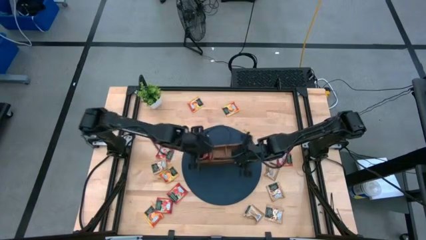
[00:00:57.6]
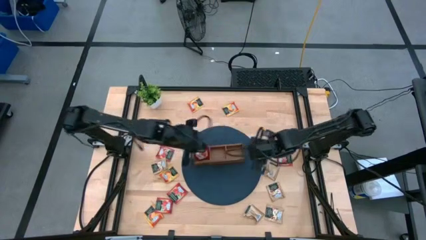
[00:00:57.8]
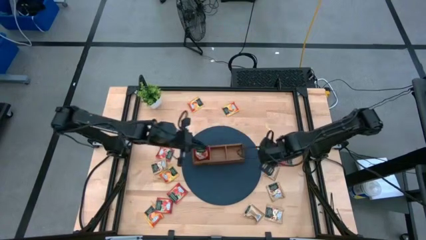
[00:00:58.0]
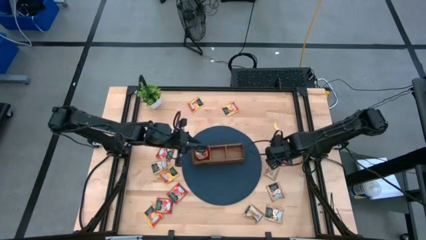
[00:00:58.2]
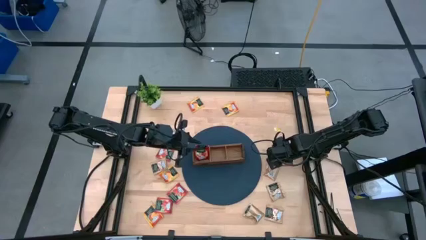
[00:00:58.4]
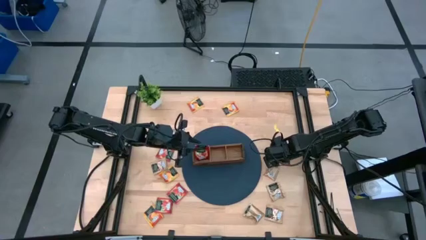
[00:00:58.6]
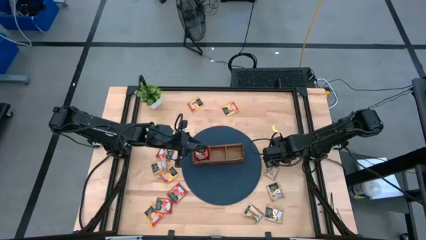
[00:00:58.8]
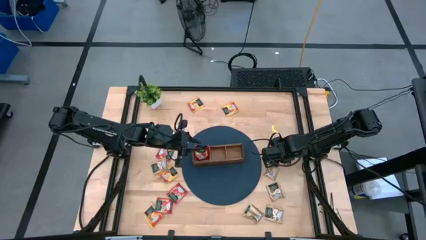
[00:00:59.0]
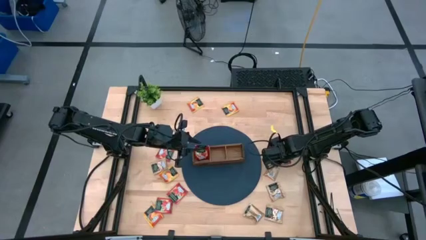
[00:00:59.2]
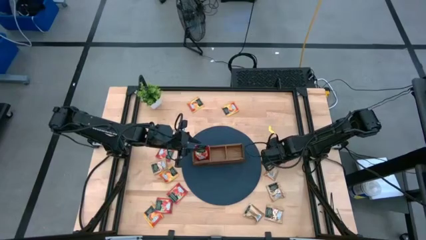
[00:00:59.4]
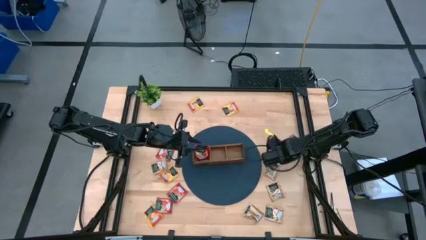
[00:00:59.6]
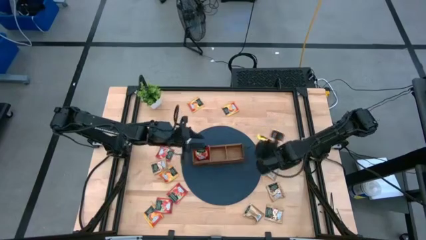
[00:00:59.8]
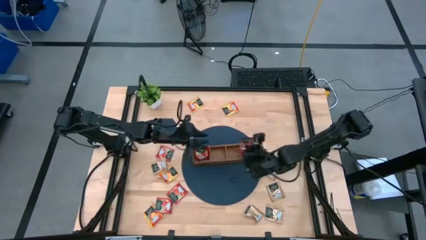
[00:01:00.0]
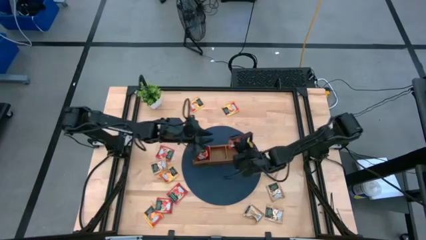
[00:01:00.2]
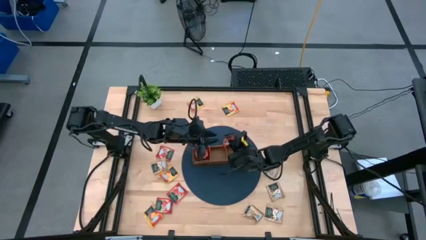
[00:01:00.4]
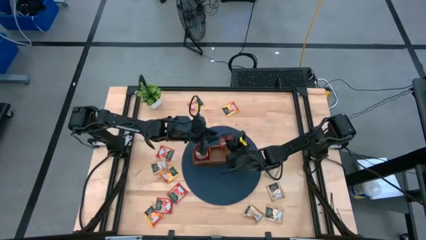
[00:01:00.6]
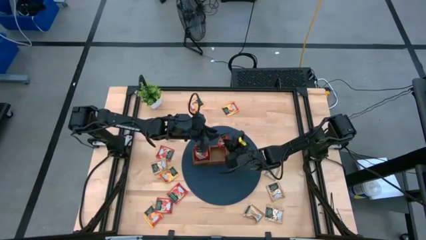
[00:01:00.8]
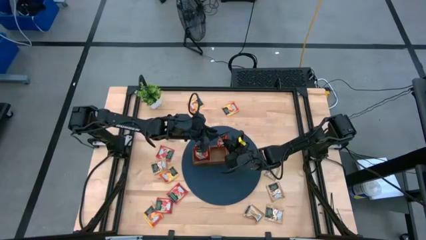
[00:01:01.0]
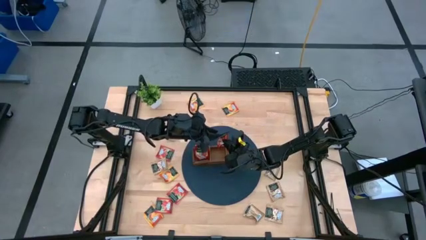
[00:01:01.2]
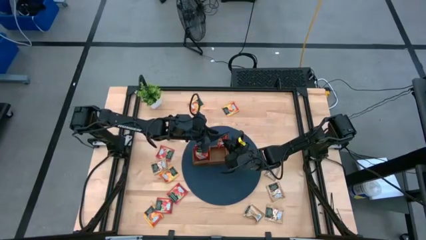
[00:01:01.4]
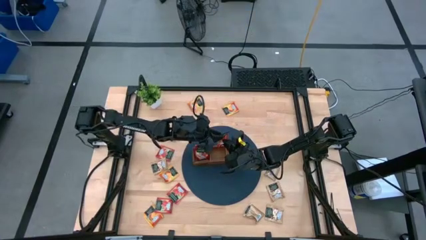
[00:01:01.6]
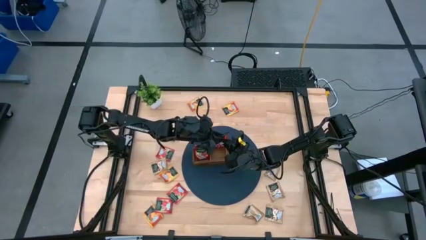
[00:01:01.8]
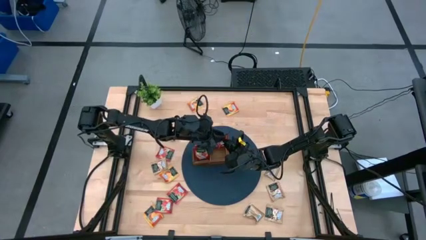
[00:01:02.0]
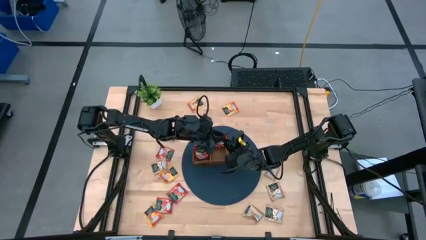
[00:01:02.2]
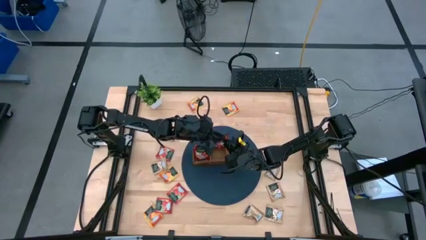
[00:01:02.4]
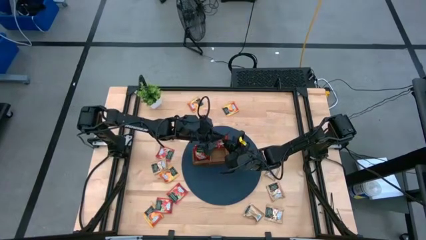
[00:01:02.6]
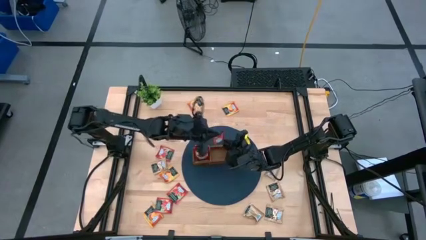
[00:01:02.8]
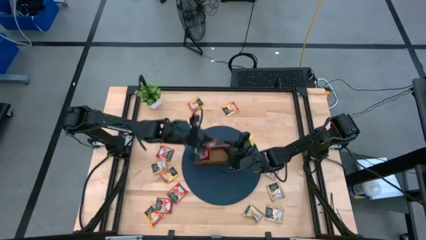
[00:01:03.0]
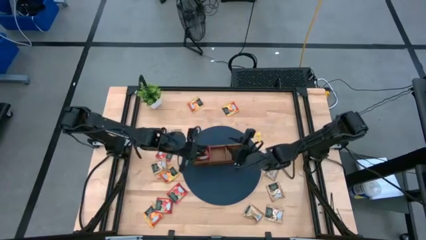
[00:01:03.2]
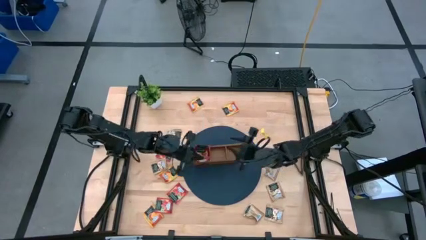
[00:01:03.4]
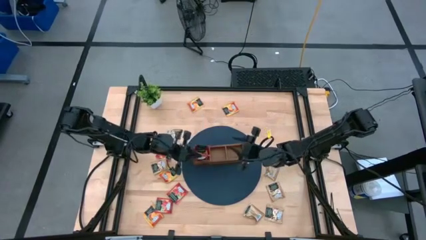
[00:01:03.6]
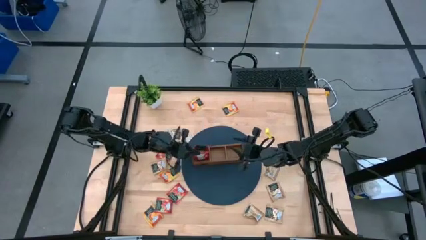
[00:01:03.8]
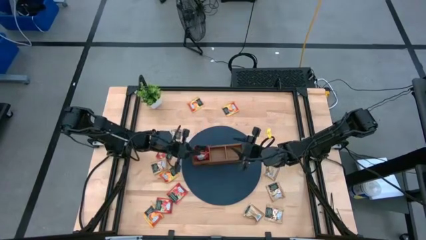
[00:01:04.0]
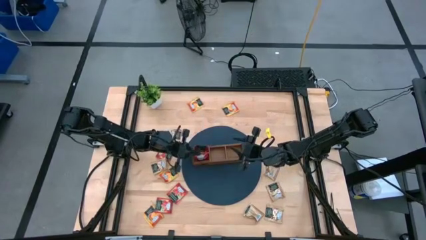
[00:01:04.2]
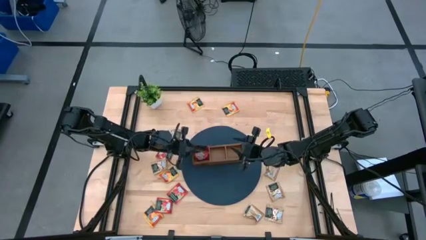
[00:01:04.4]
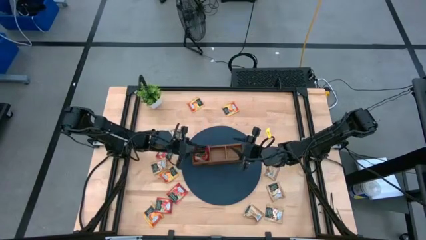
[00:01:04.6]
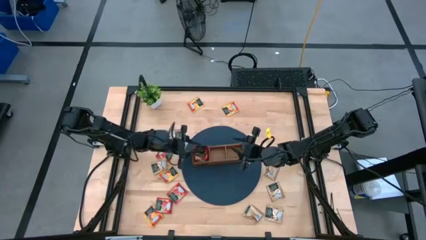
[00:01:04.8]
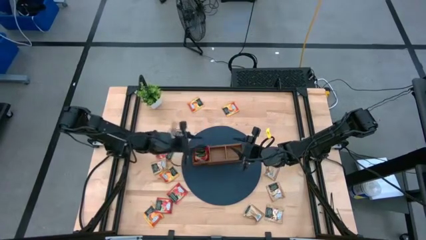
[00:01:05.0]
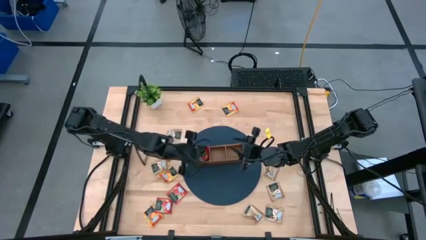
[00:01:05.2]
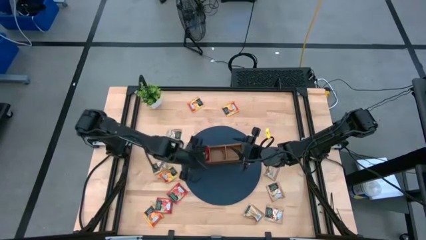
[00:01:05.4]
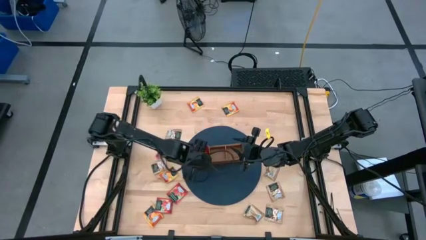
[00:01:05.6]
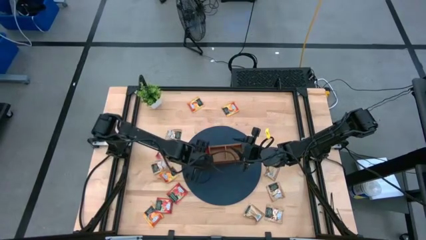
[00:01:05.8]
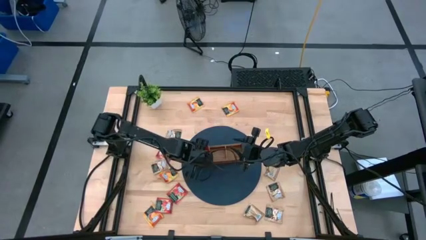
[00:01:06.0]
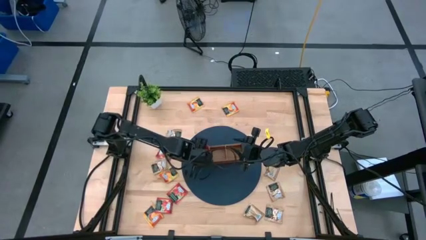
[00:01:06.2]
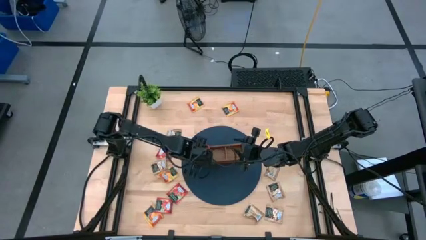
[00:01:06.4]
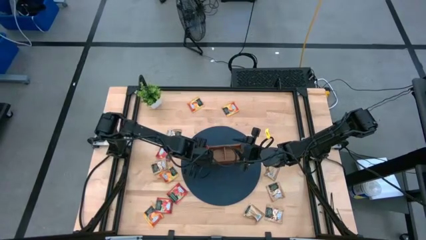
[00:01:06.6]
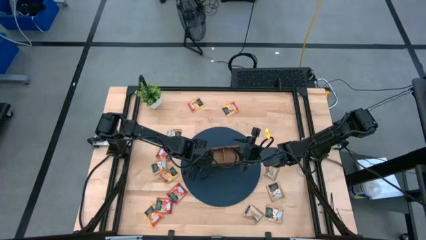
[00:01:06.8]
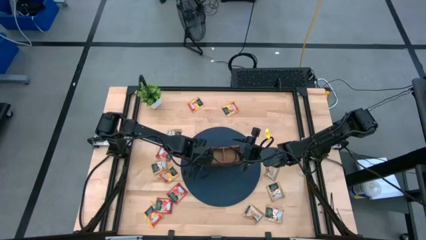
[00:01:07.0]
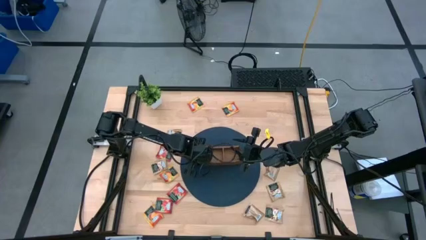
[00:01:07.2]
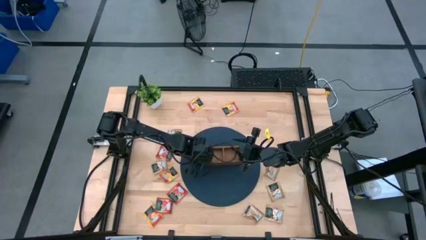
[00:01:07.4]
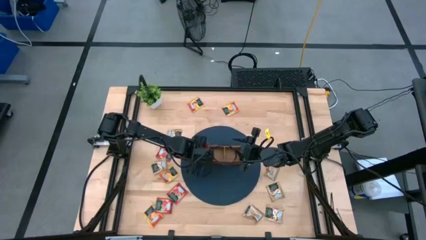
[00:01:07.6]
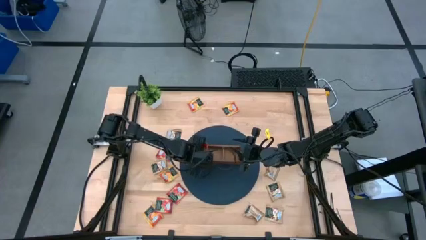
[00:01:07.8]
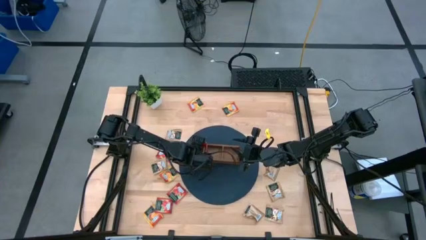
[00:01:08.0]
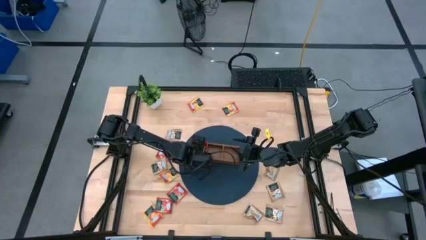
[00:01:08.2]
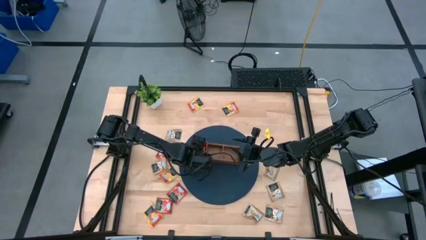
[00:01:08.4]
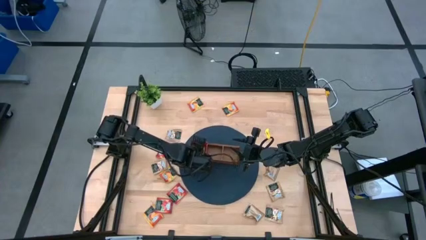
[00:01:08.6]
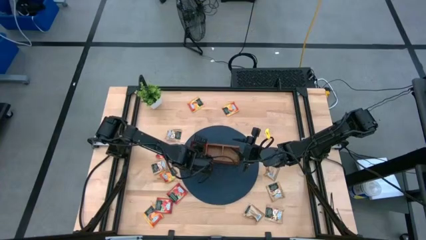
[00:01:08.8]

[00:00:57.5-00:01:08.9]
Task: Pick & Place Tea
Put the red tea bag into the left section of the wooden organizer
